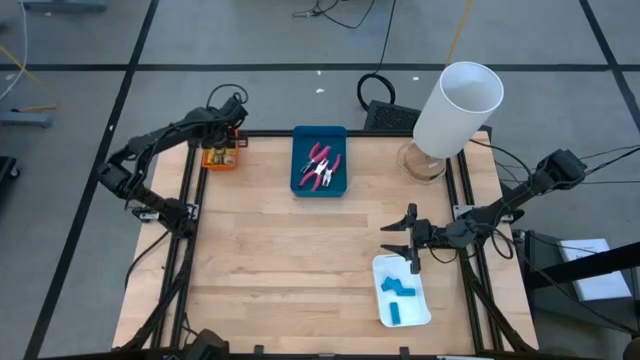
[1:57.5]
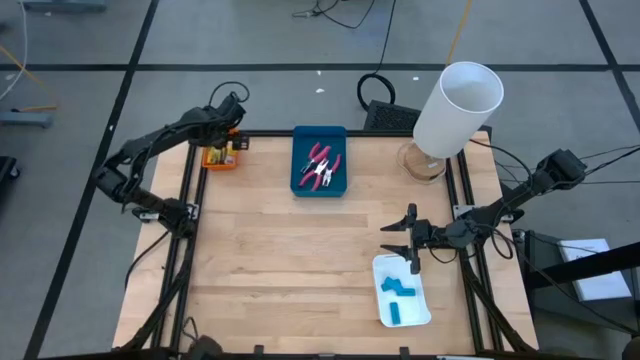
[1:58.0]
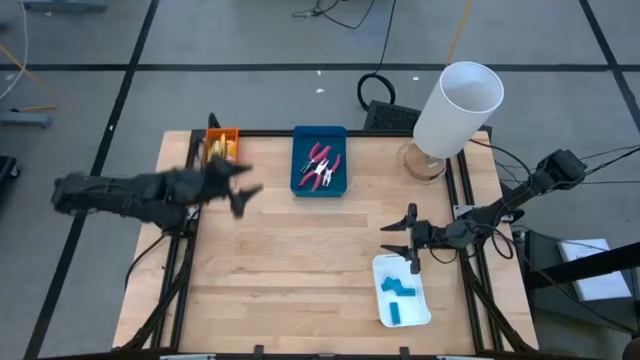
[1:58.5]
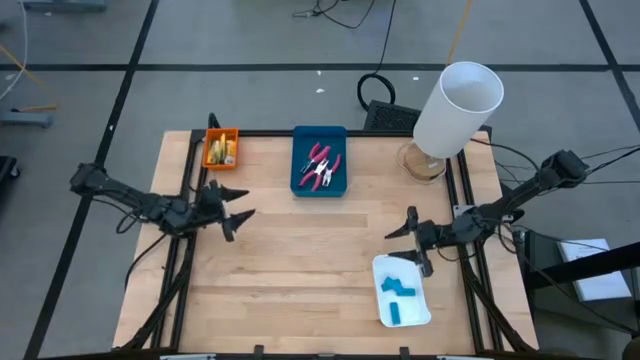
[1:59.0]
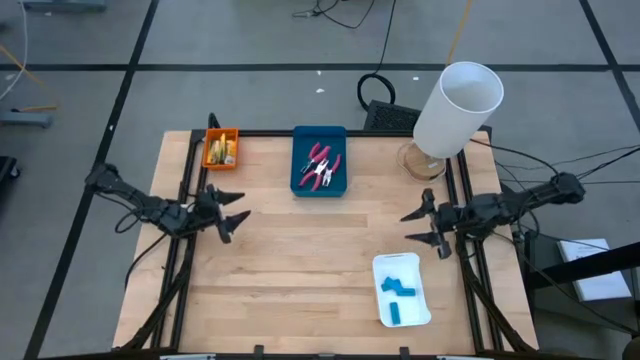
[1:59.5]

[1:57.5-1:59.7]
Task: Pick & Place School Supplies
Return to Home Position

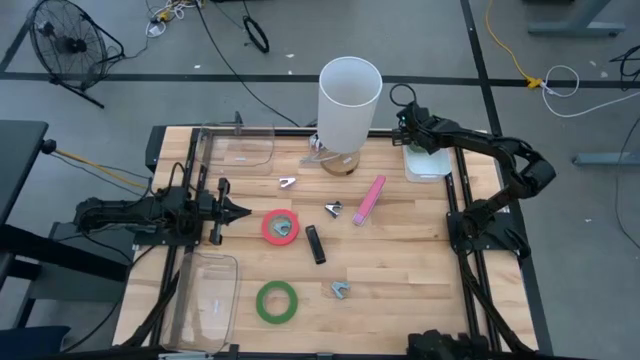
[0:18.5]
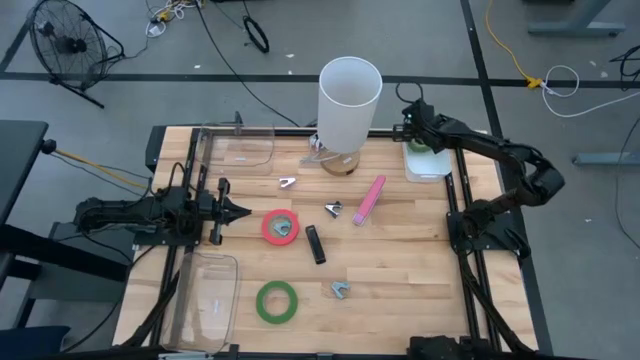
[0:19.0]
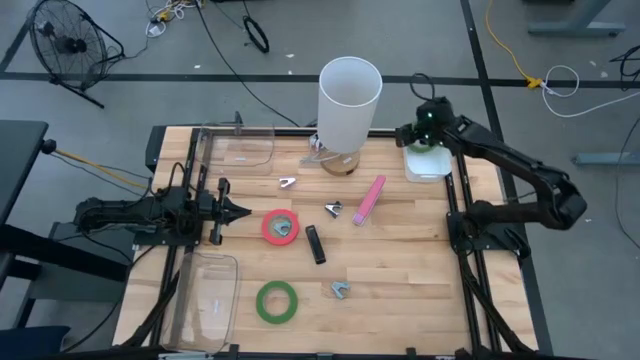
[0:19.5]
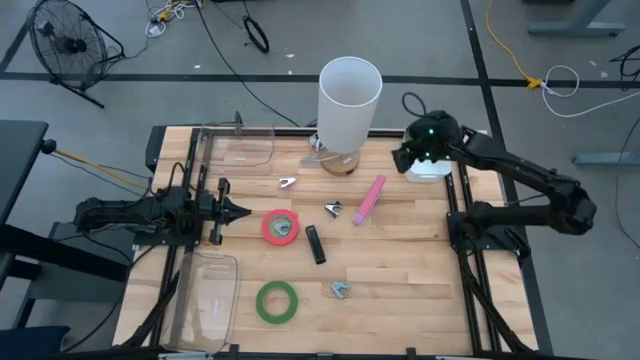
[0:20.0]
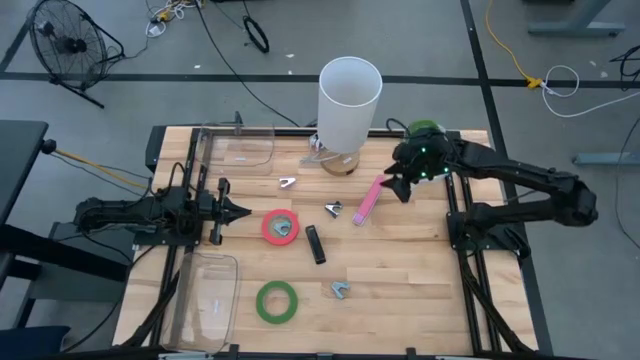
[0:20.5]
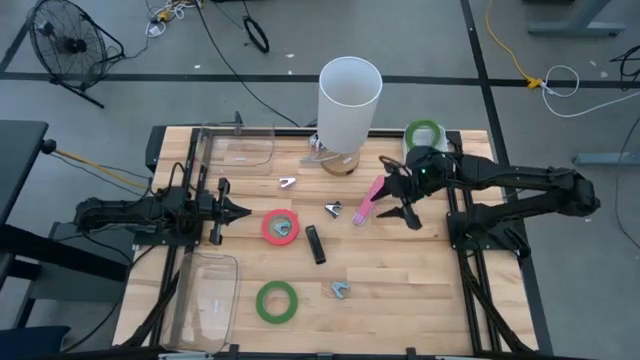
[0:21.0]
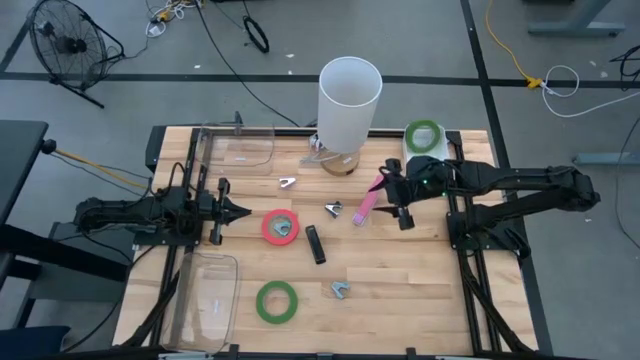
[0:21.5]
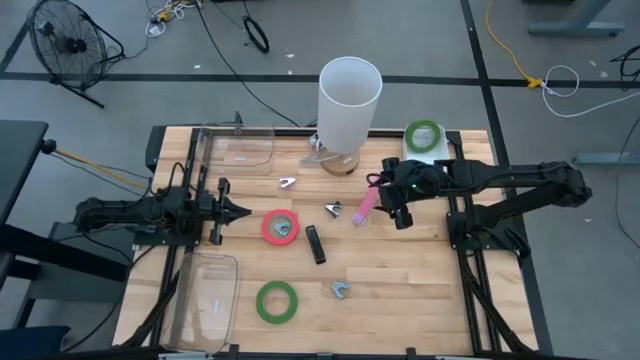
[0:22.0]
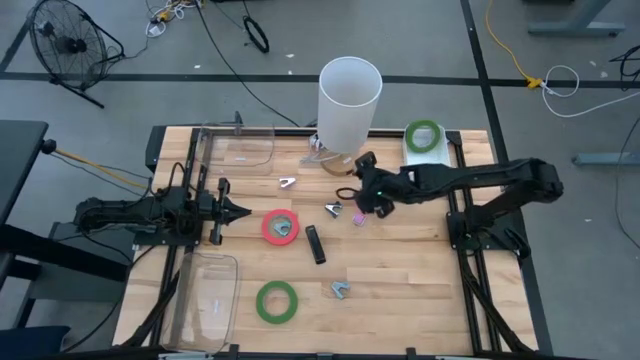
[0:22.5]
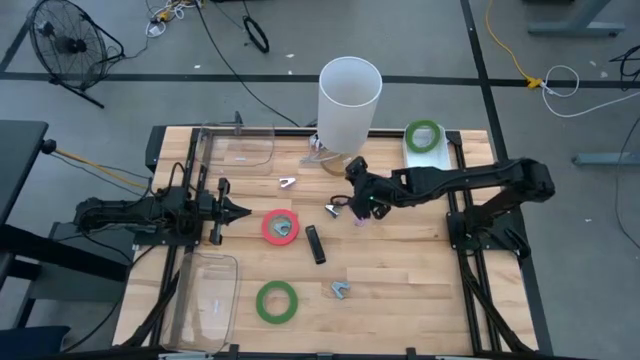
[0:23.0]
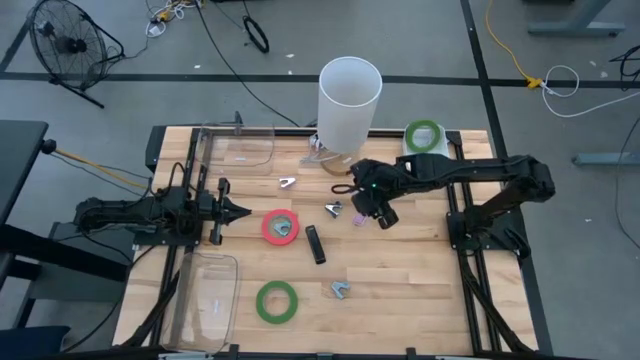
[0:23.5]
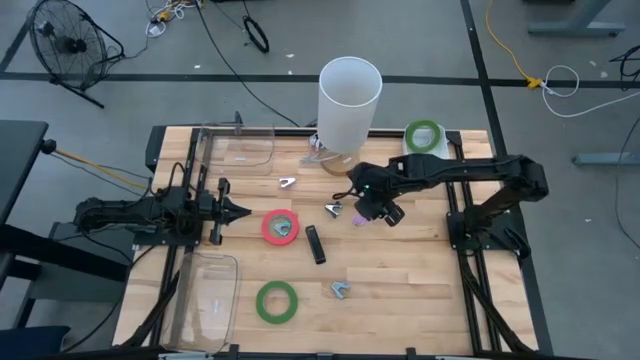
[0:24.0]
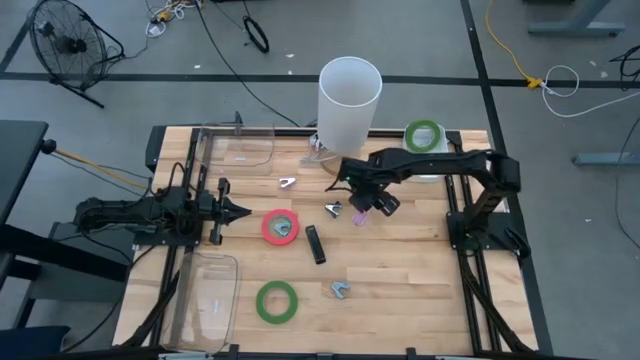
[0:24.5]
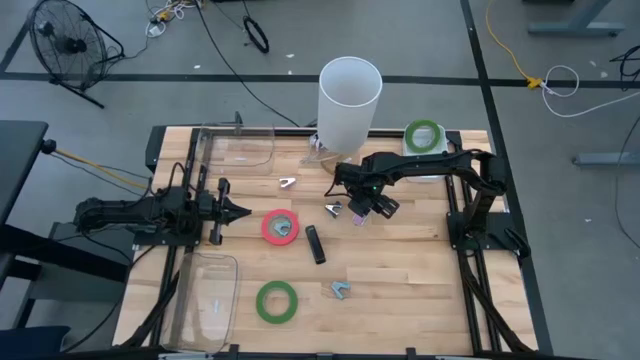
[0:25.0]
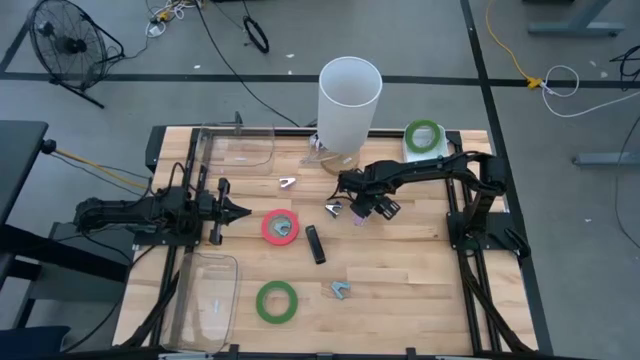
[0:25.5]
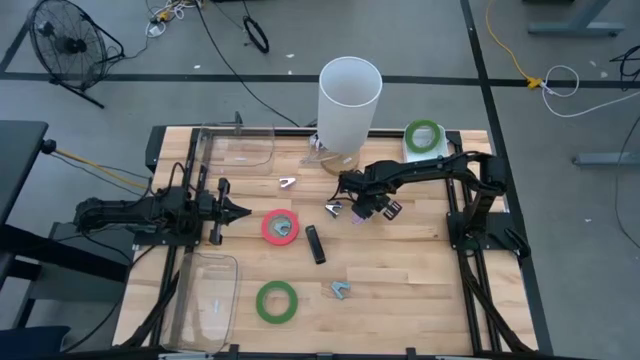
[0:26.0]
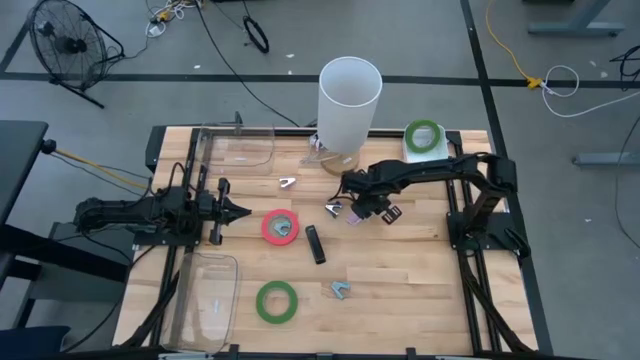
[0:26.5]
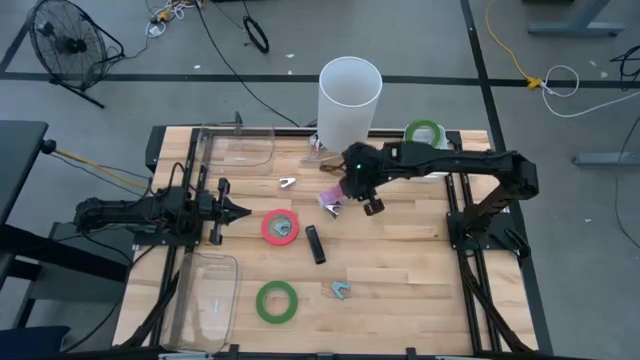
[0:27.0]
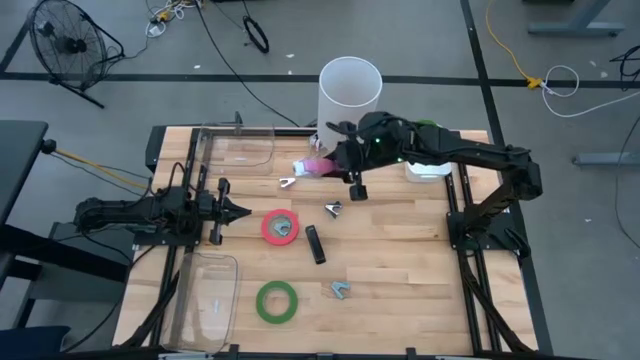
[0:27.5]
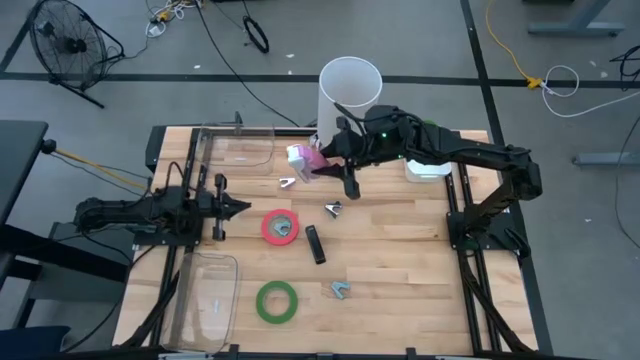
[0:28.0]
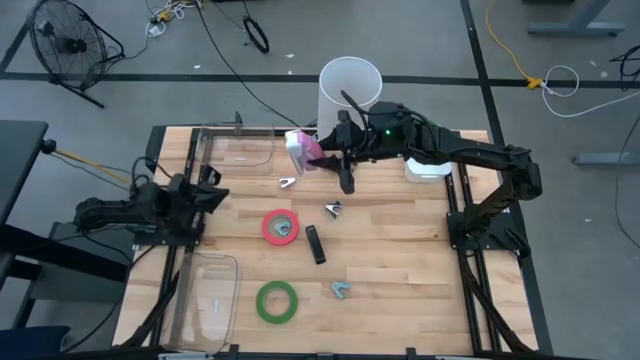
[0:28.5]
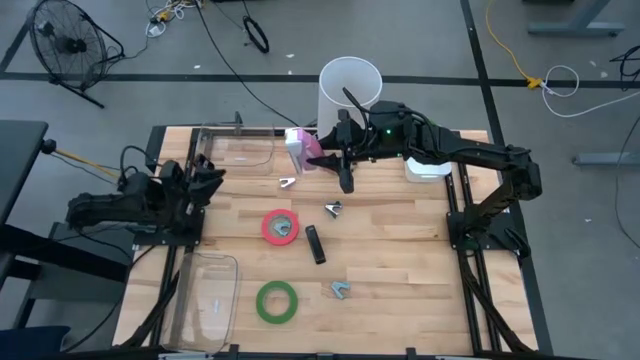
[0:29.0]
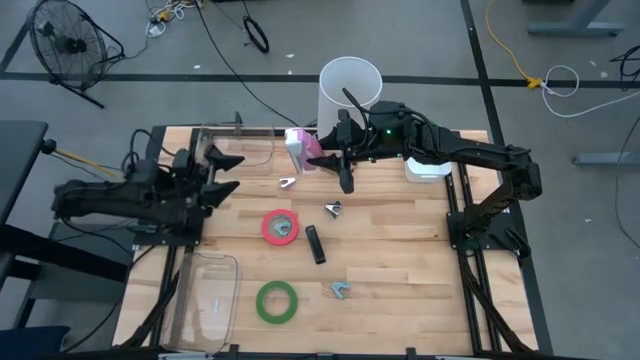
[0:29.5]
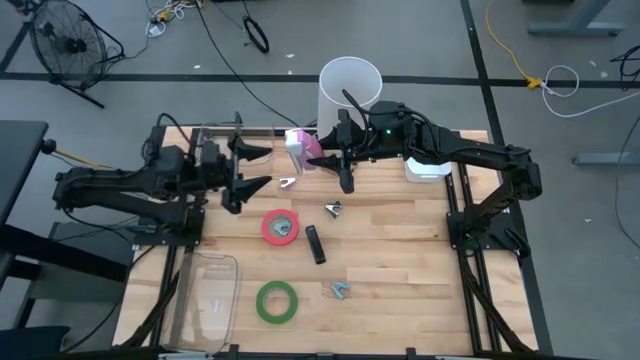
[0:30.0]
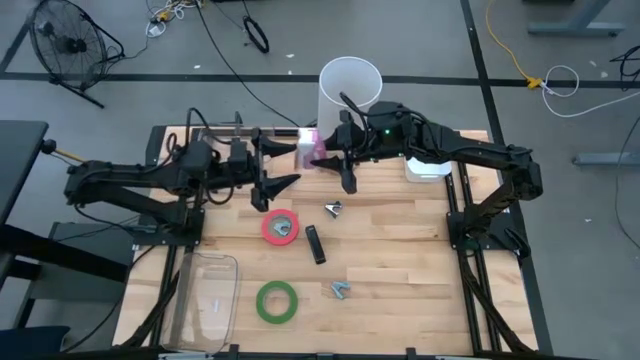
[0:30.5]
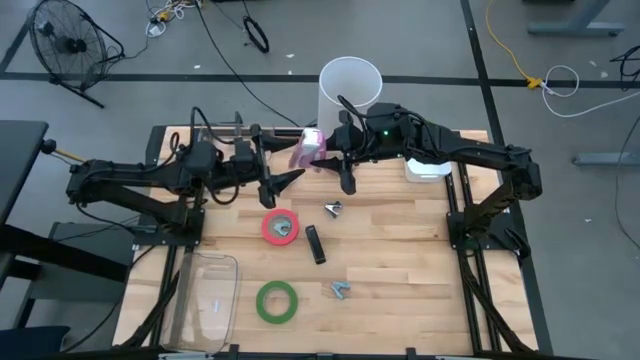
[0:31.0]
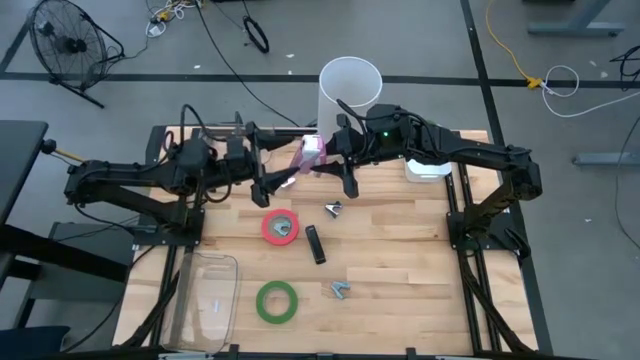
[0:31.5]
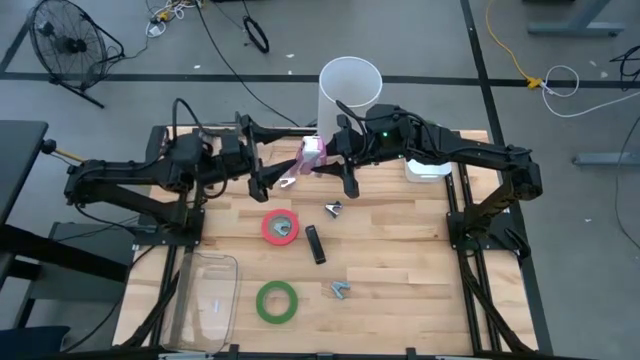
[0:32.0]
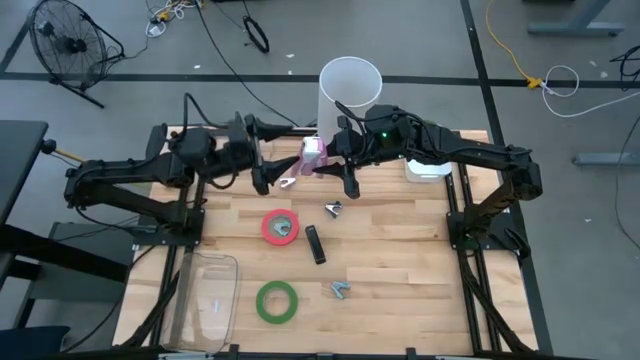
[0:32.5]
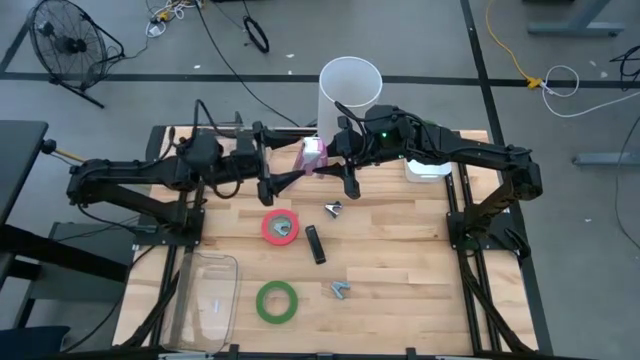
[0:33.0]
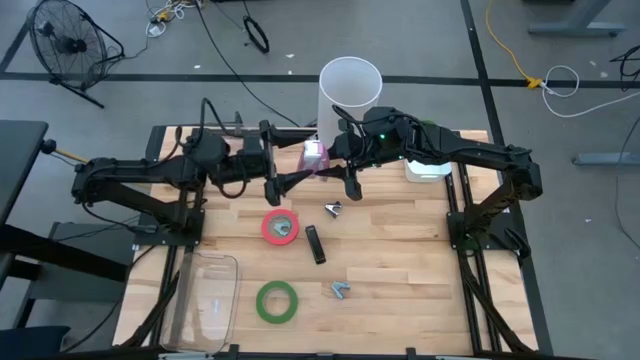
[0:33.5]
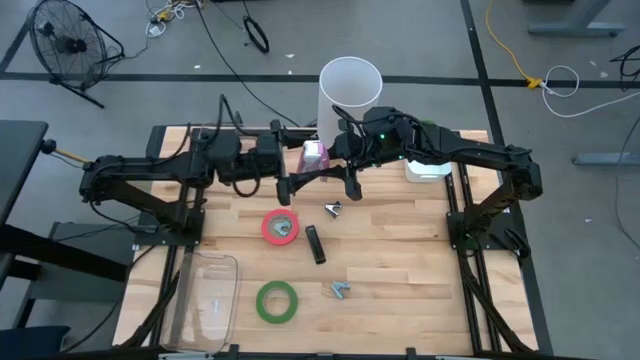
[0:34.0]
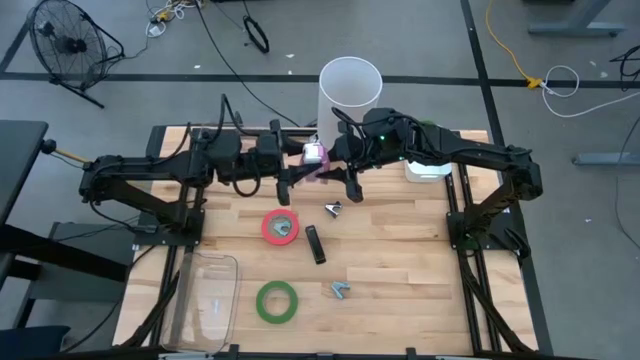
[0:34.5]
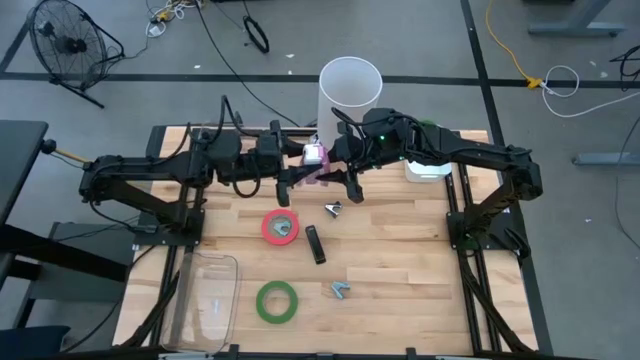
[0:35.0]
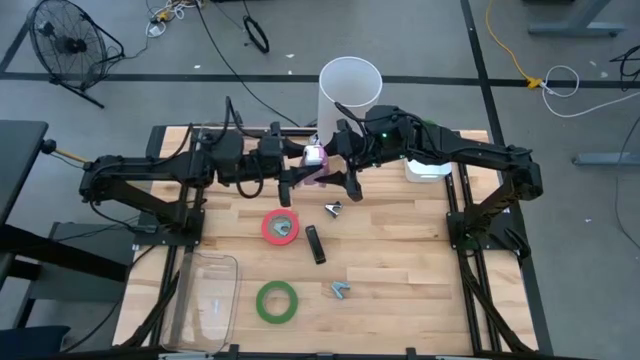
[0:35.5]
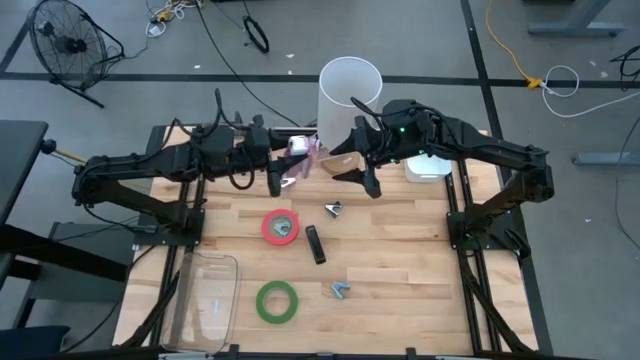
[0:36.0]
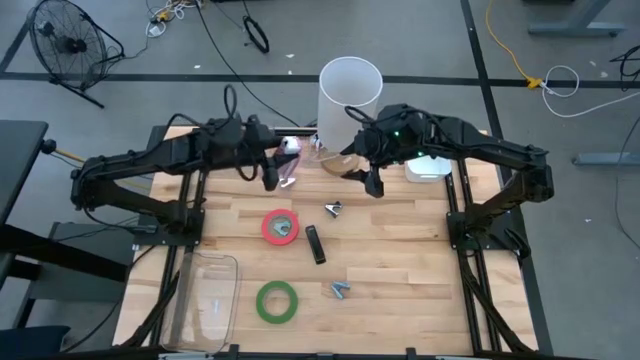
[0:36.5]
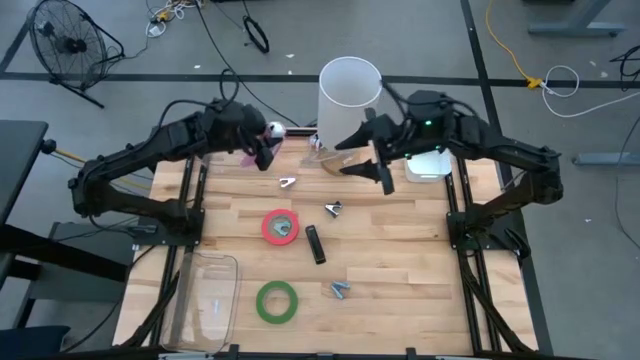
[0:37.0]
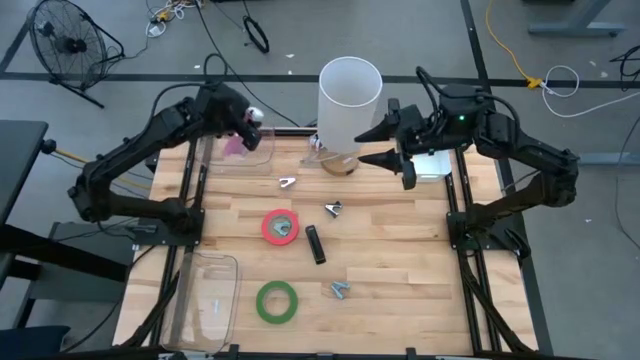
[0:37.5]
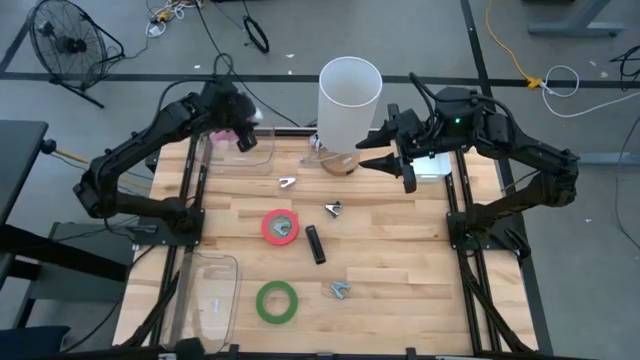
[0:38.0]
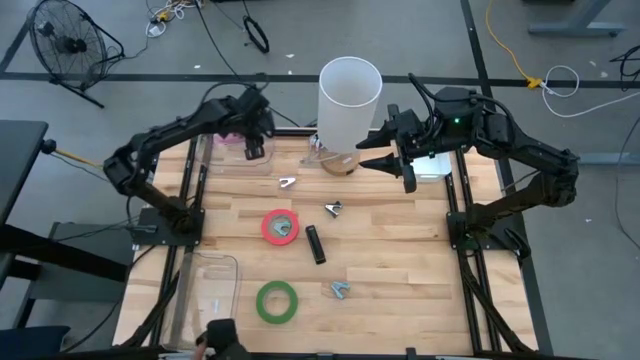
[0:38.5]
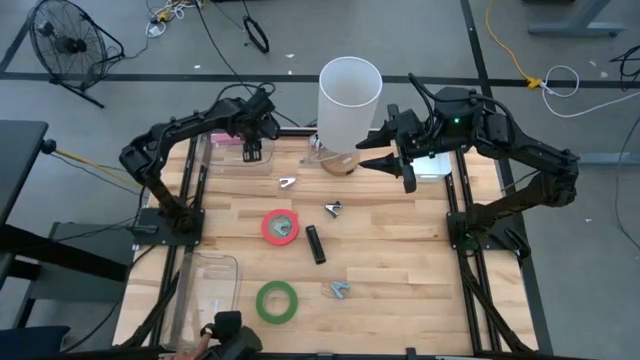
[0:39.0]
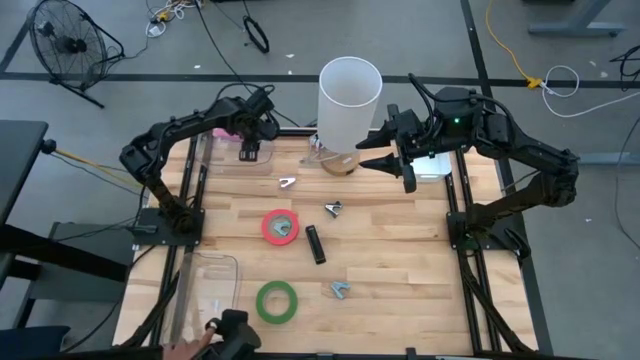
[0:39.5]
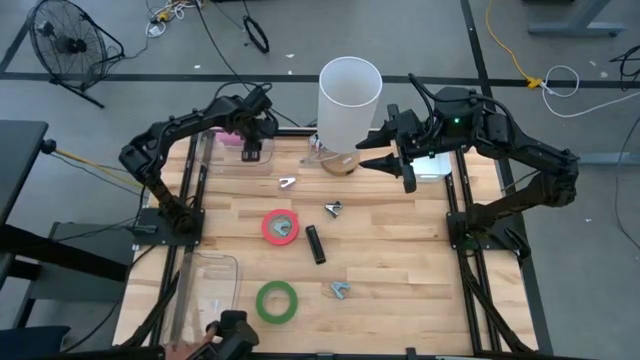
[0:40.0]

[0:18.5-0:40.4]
Task: Pick and place Stapler, Stapler remover, tape
Put the pink stapler into the top transparent bin
